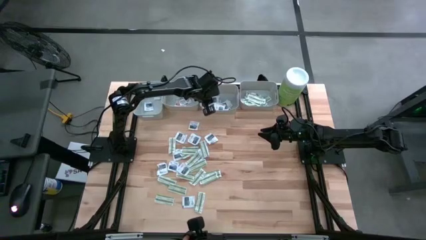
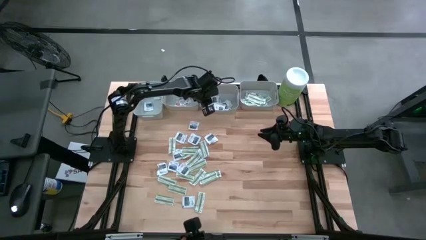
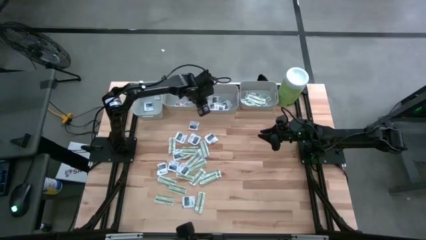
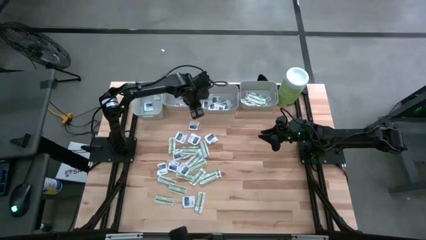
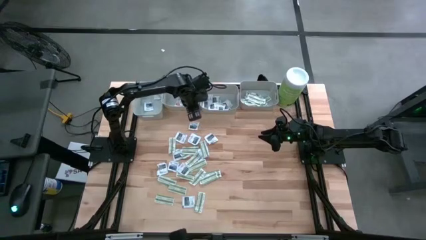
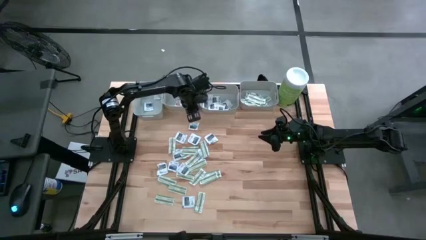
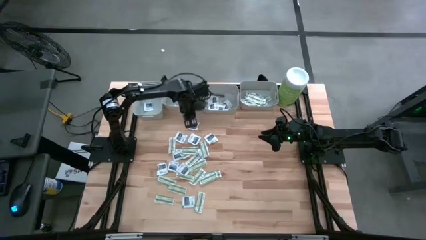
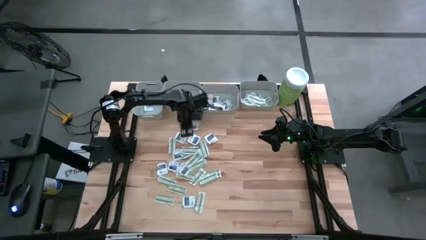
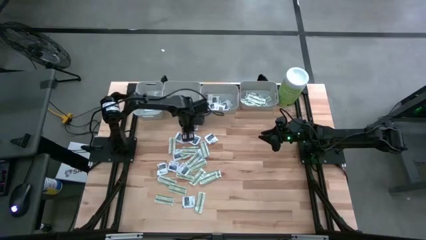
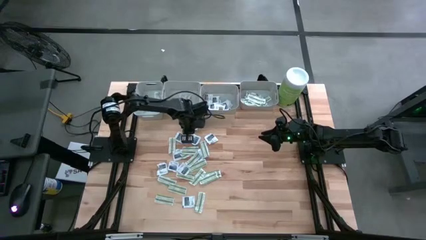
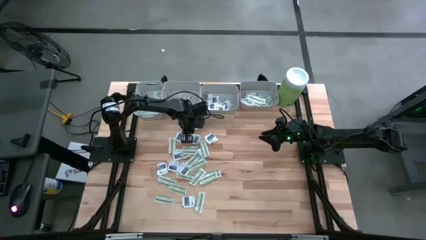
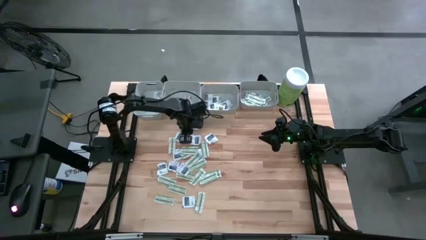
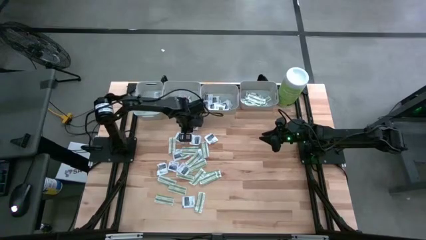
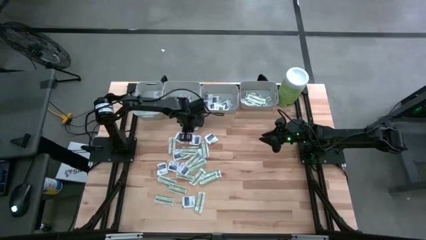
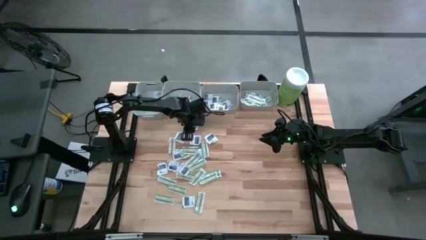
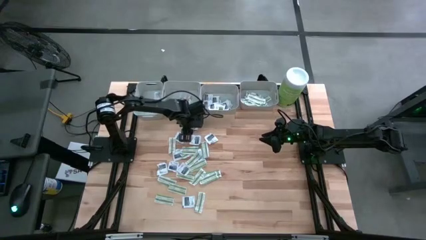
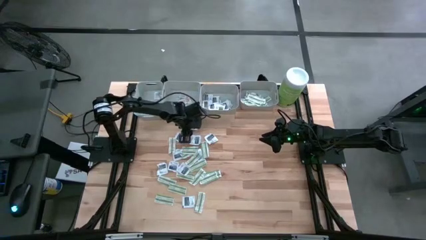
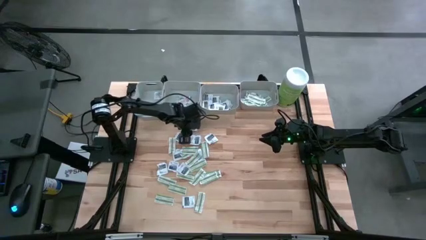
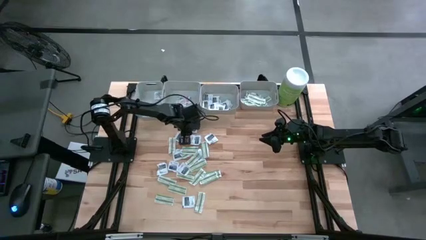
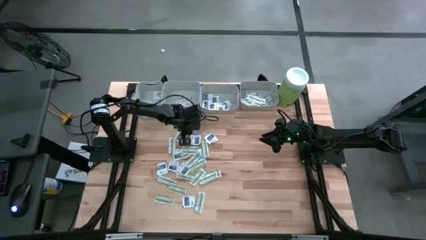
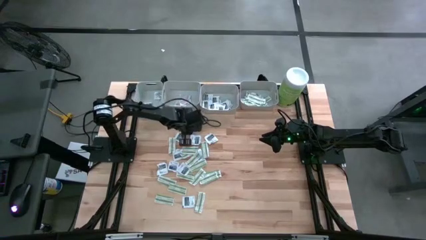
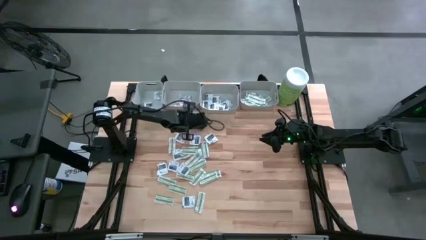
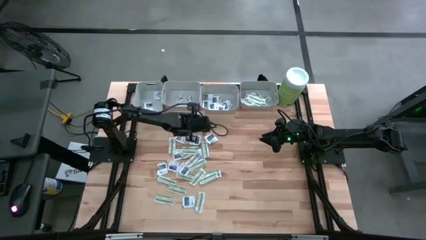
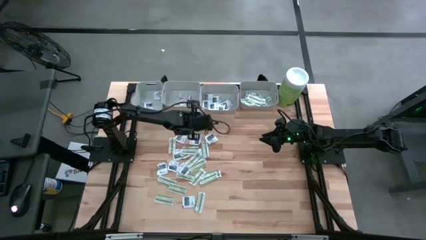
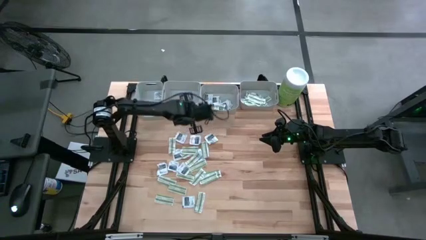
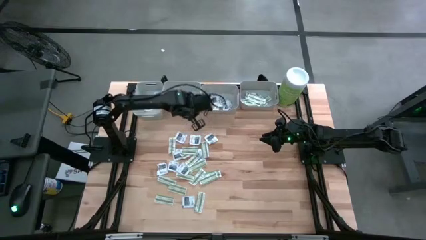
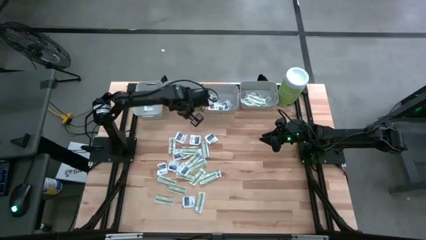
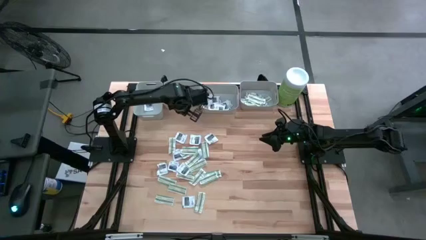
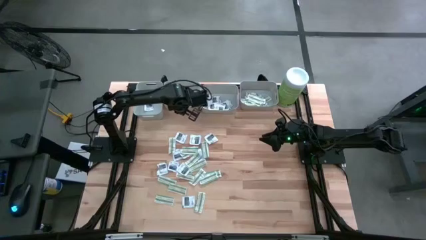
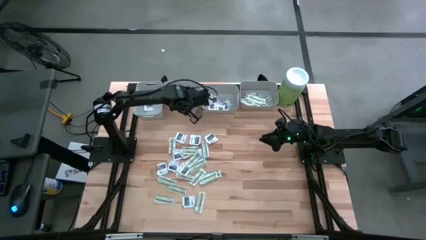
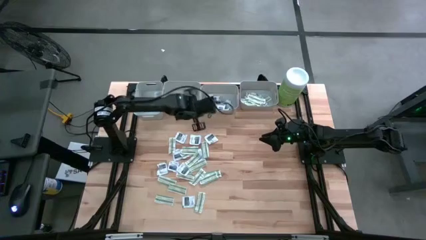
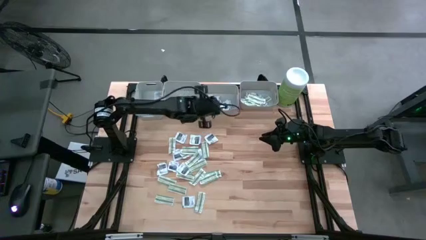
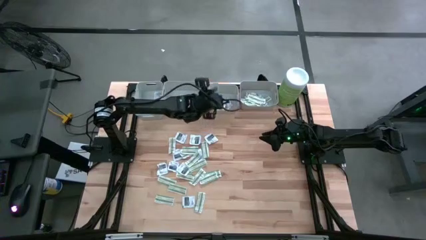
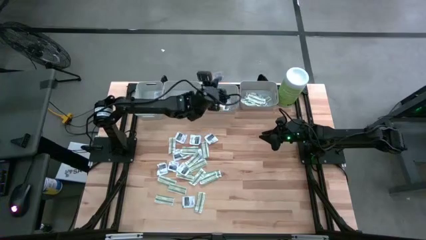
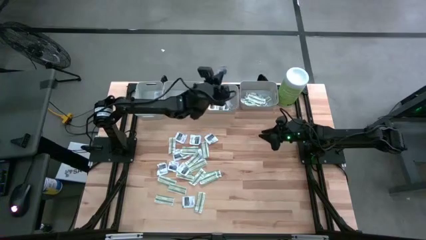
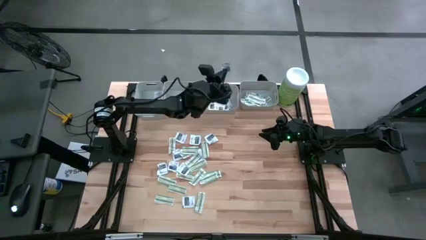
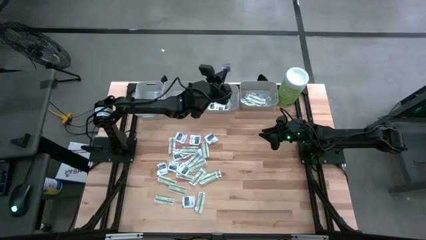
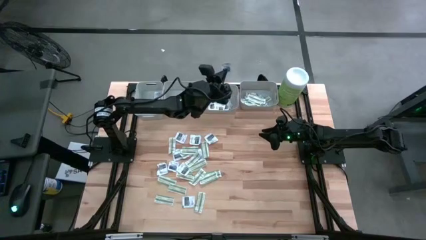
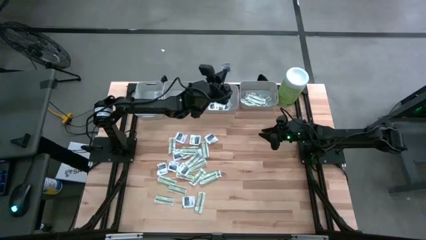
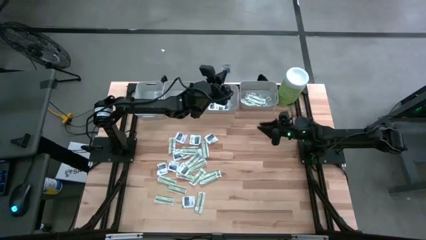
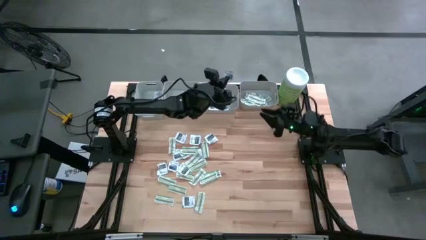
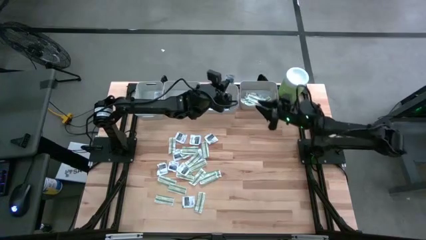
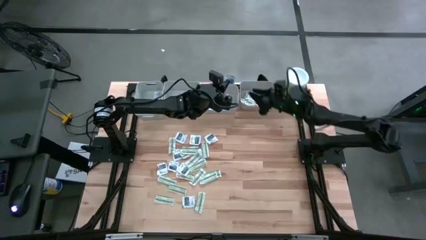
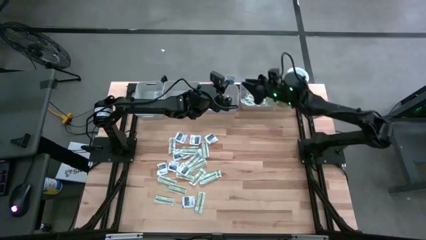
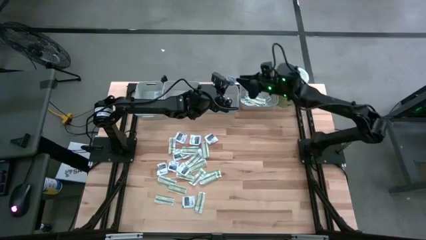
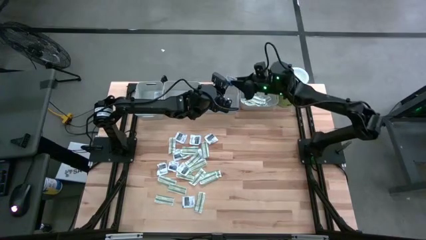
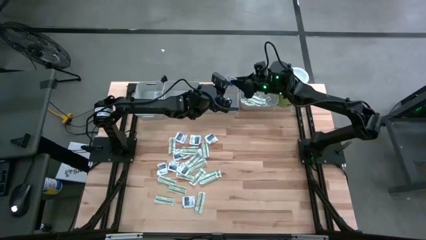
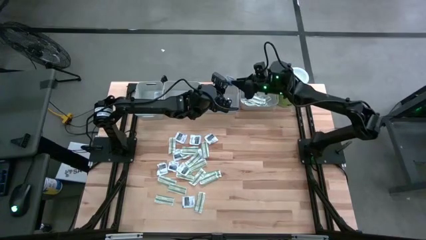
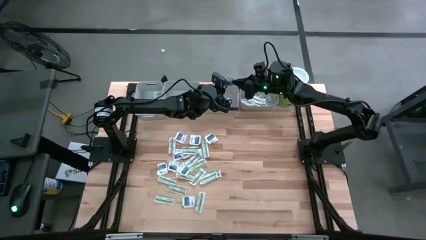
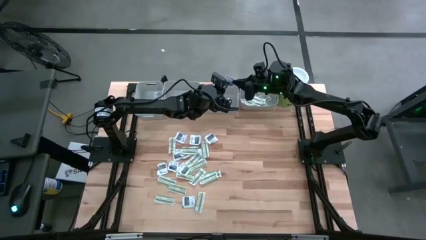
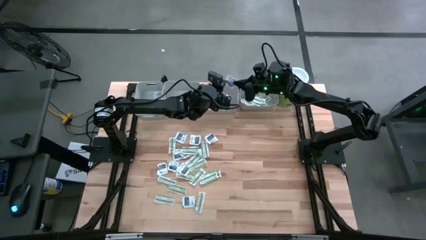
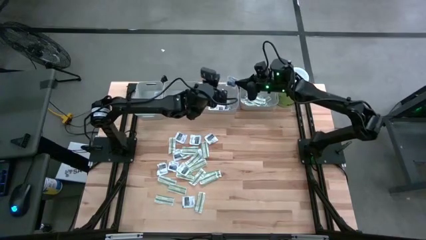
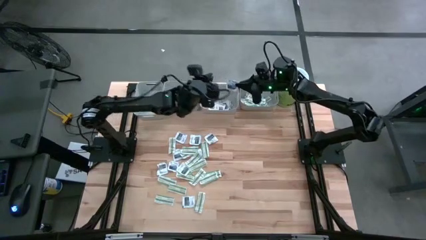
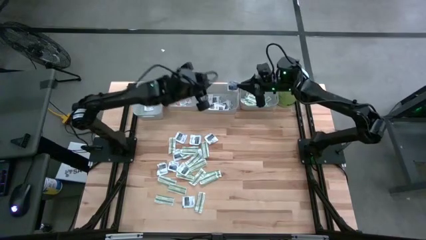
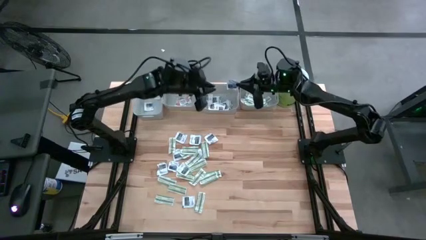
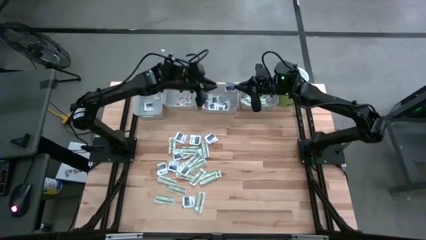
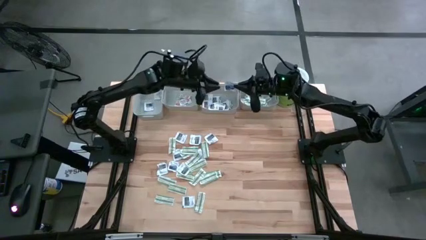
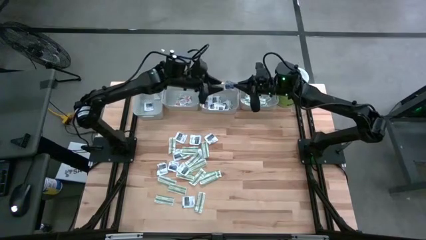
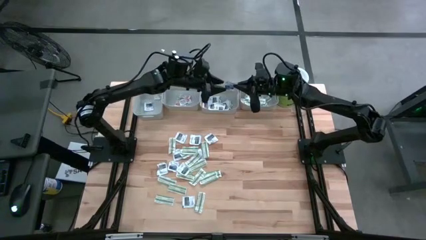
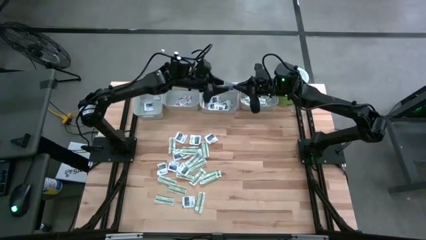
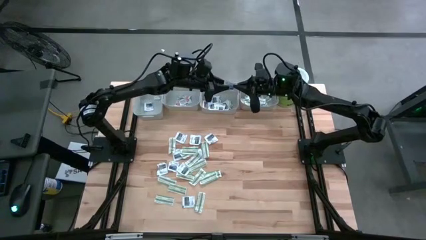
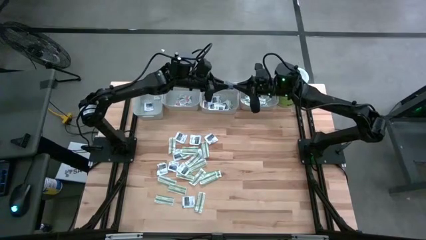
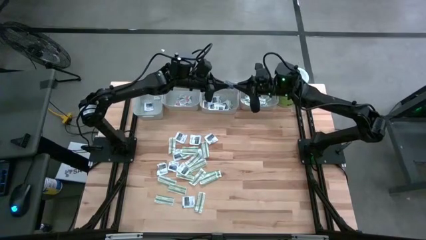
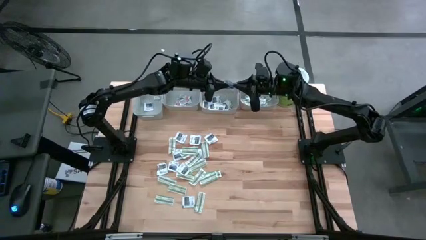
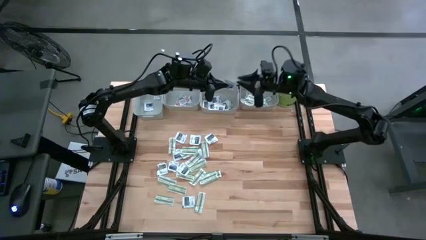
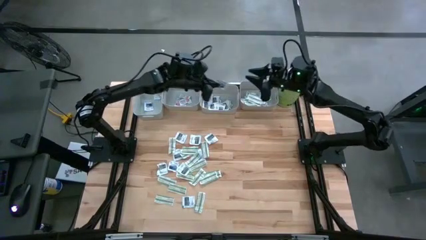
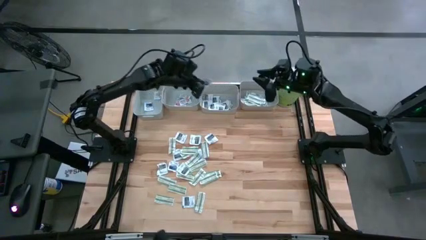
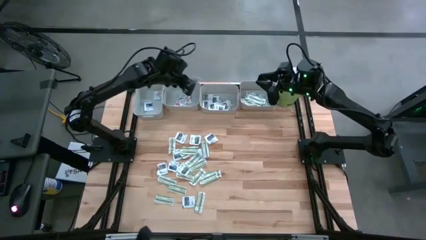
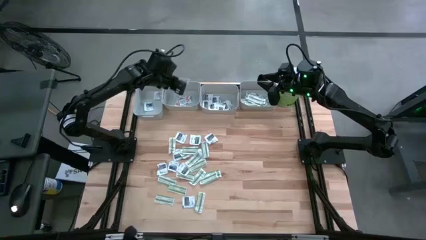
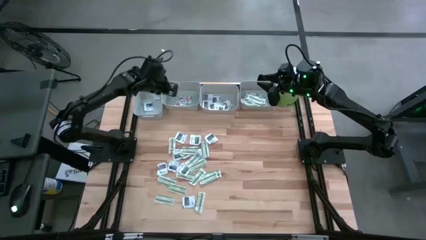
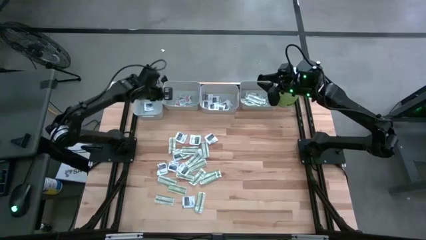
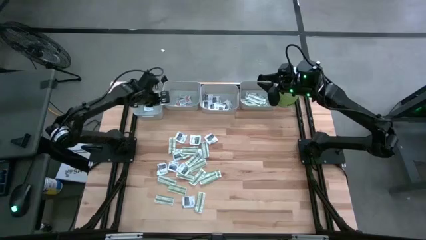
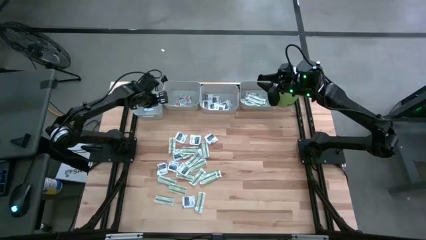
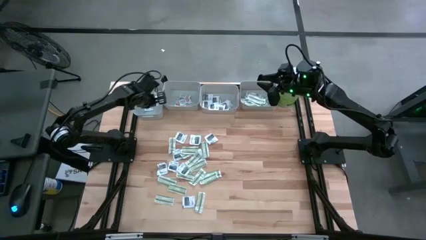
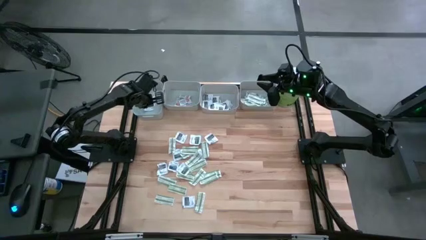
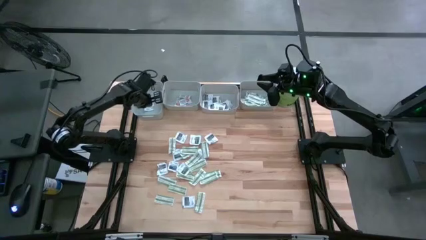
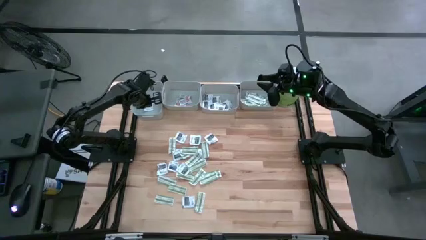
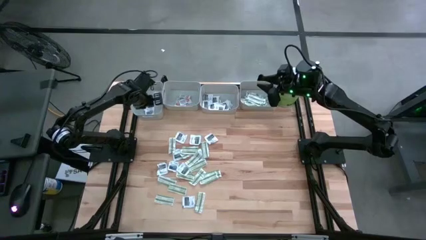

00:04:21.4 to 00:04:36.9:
Task: Pick & Place First Aid Supplies
Put the blue alcohol pad into the left gray bin
